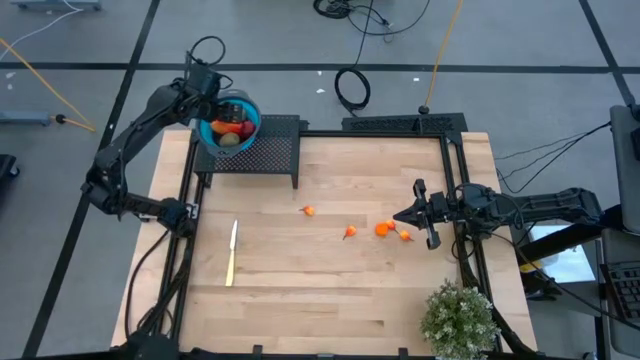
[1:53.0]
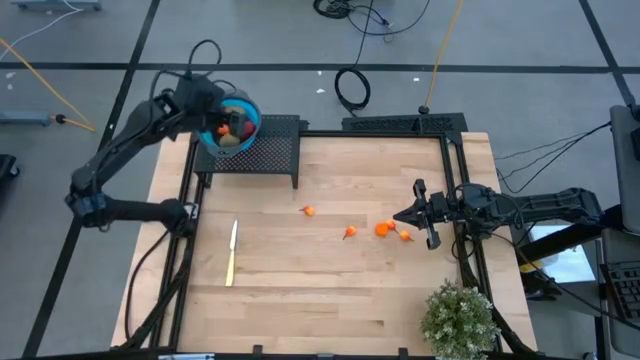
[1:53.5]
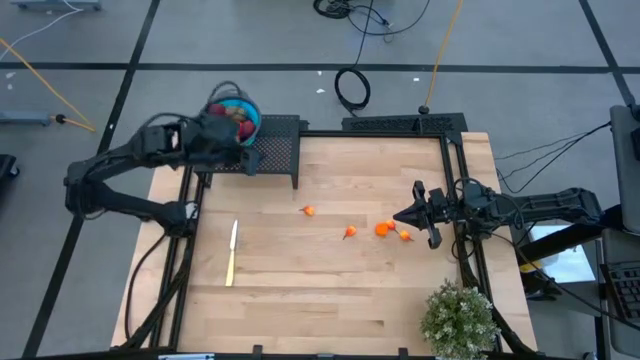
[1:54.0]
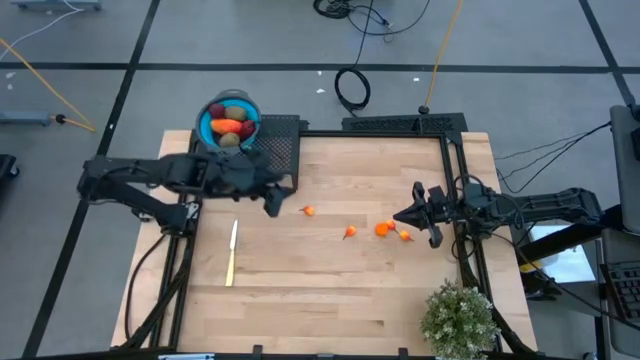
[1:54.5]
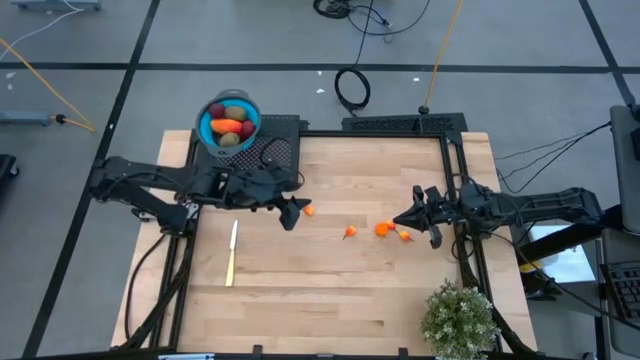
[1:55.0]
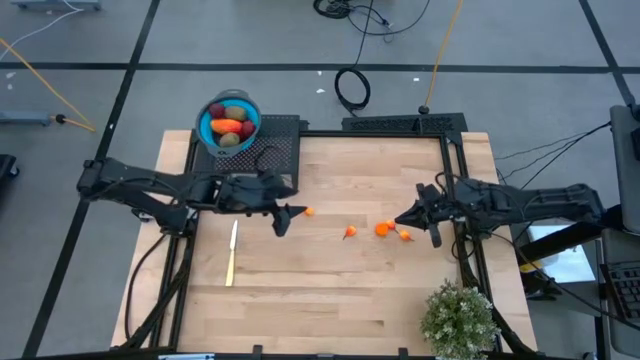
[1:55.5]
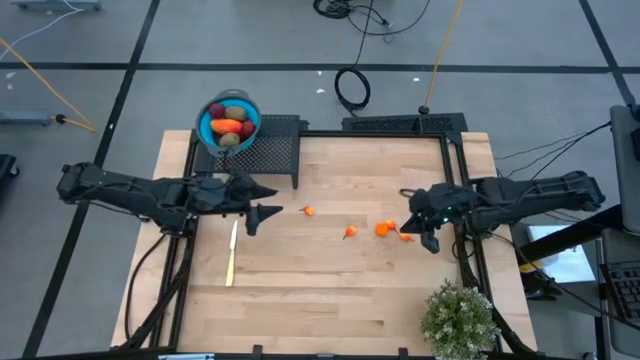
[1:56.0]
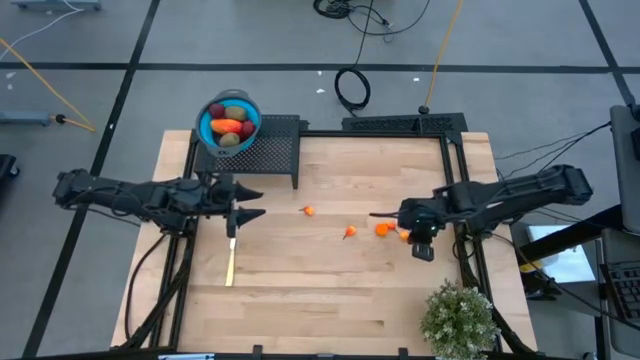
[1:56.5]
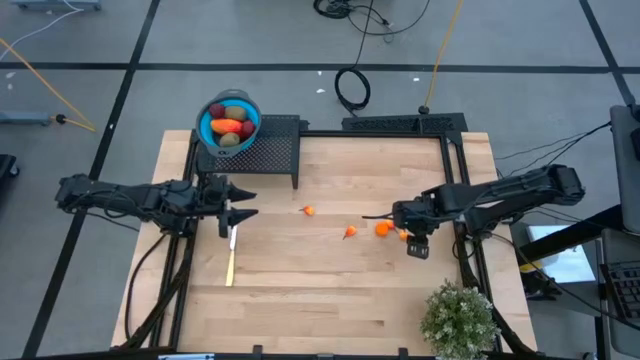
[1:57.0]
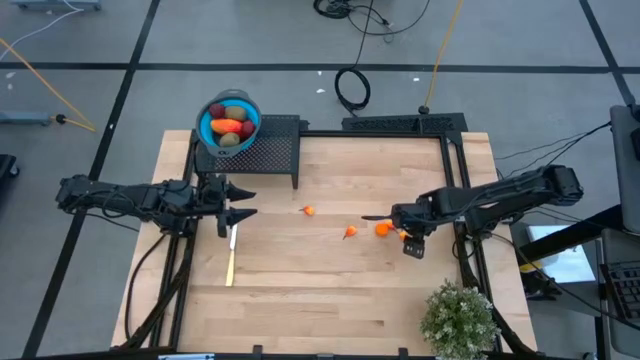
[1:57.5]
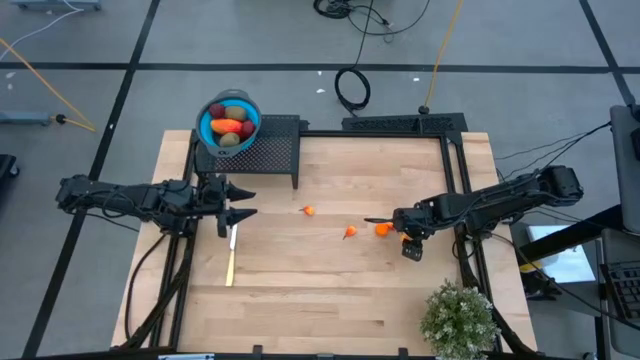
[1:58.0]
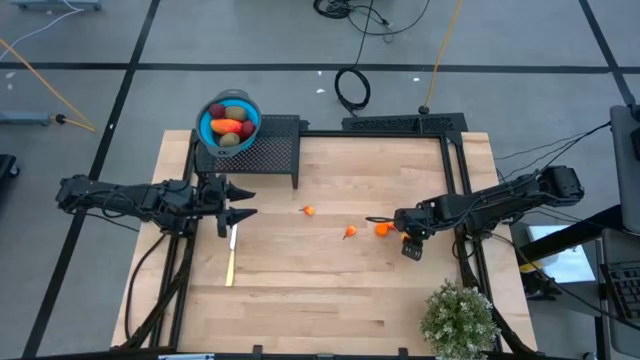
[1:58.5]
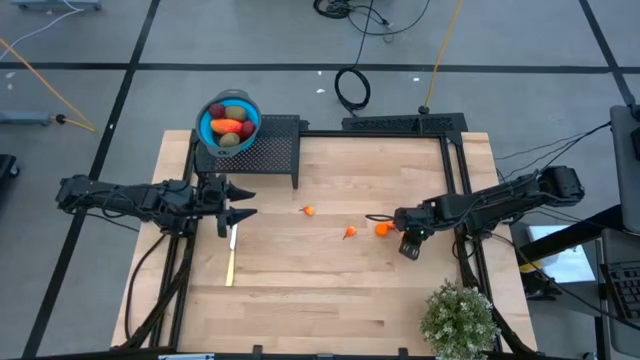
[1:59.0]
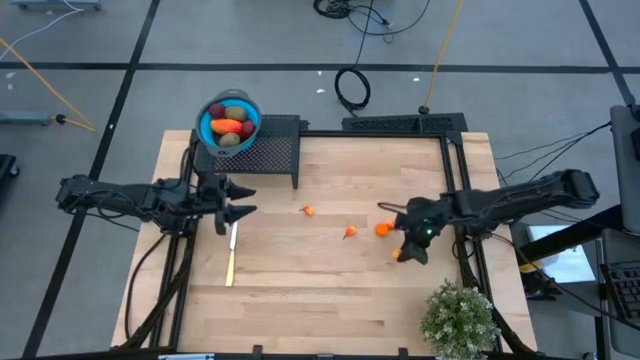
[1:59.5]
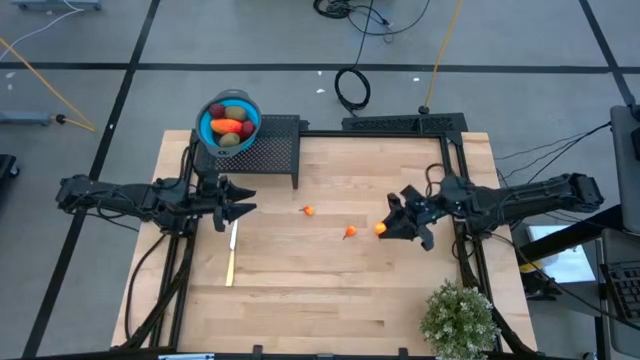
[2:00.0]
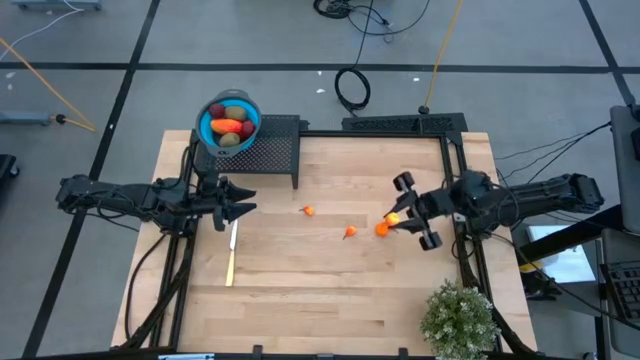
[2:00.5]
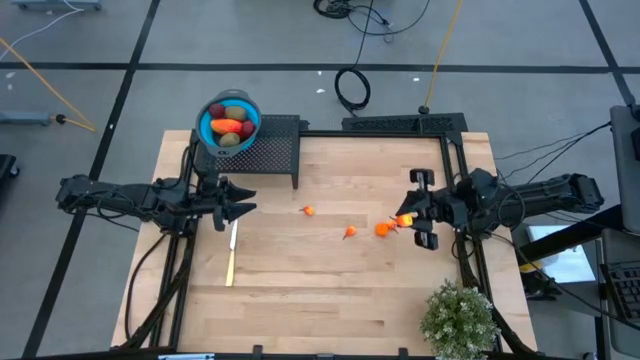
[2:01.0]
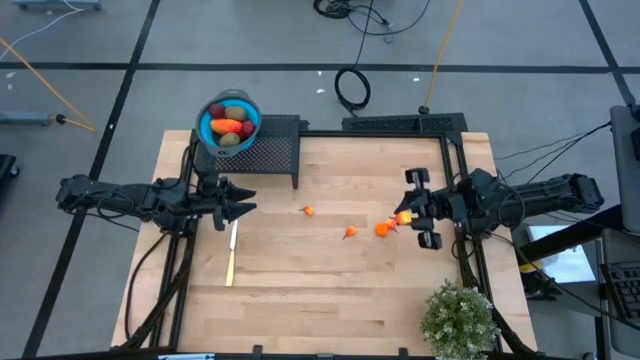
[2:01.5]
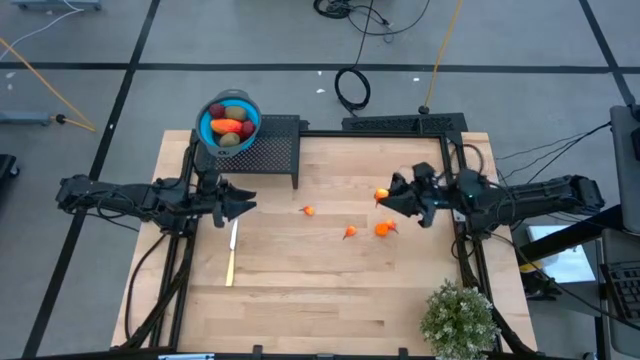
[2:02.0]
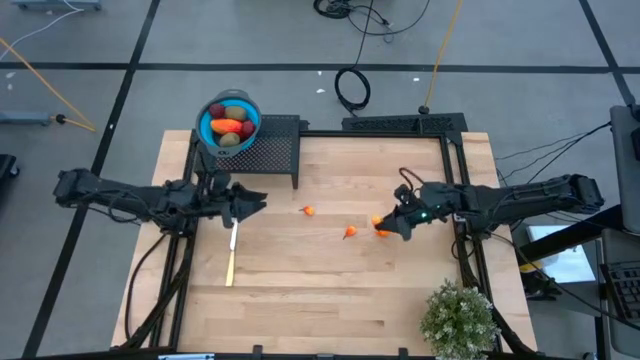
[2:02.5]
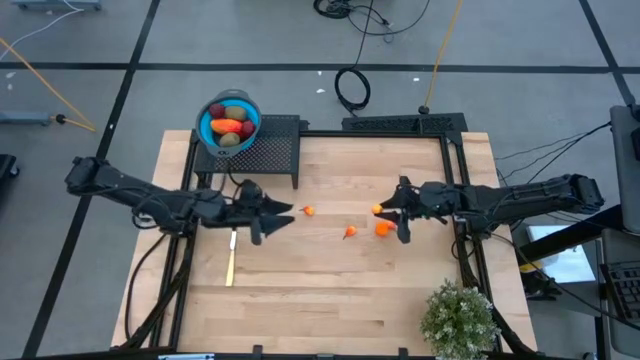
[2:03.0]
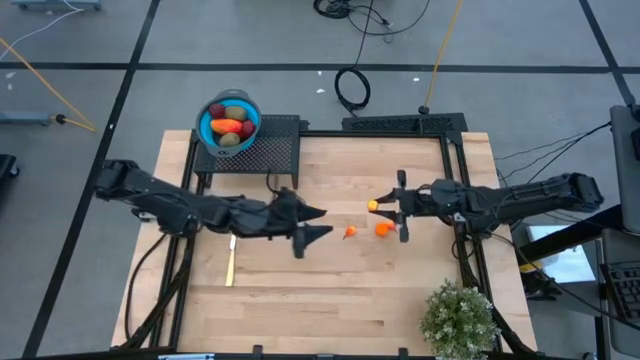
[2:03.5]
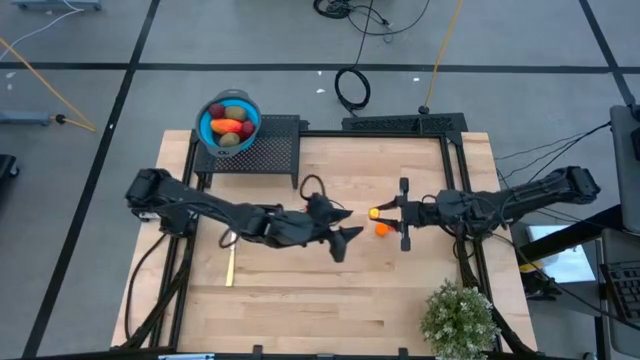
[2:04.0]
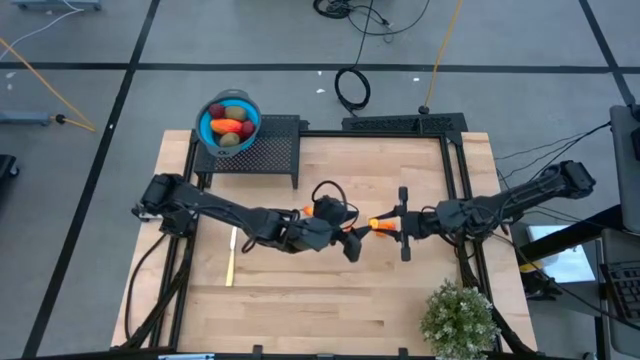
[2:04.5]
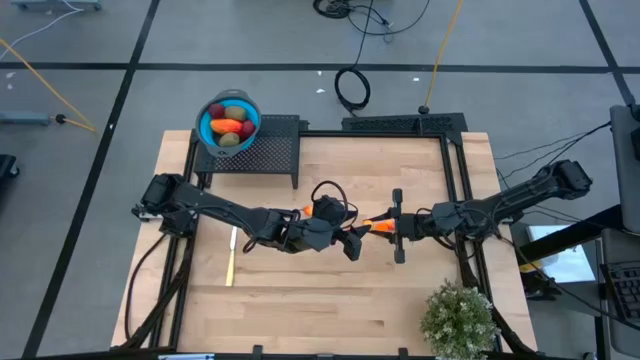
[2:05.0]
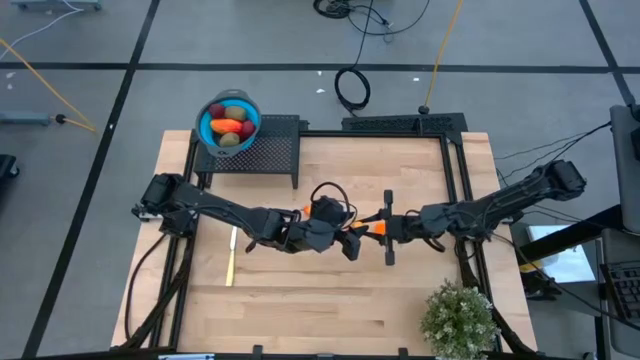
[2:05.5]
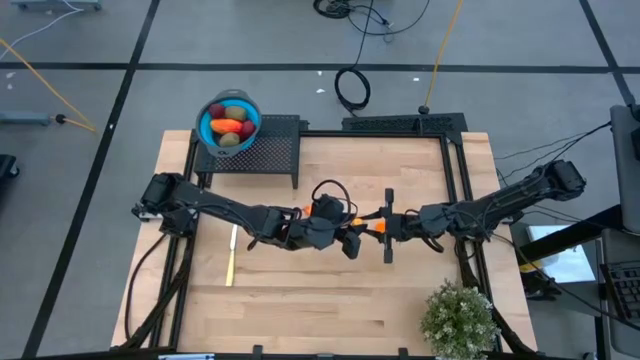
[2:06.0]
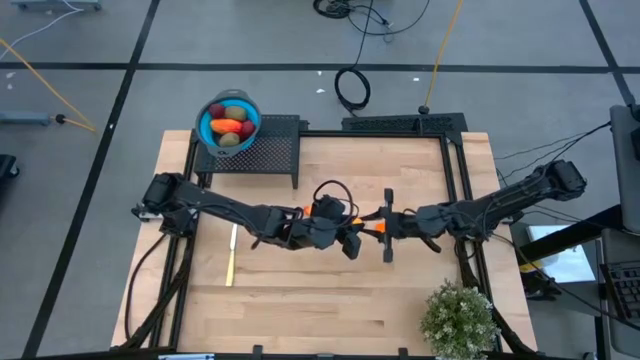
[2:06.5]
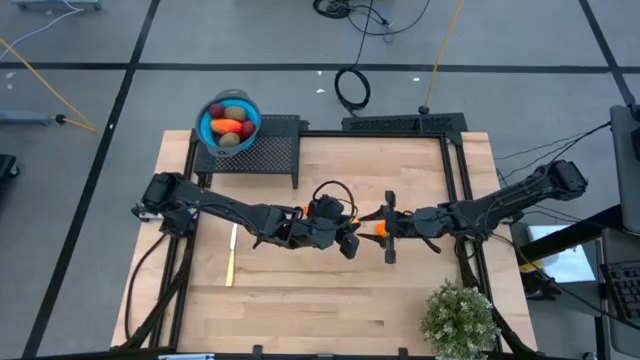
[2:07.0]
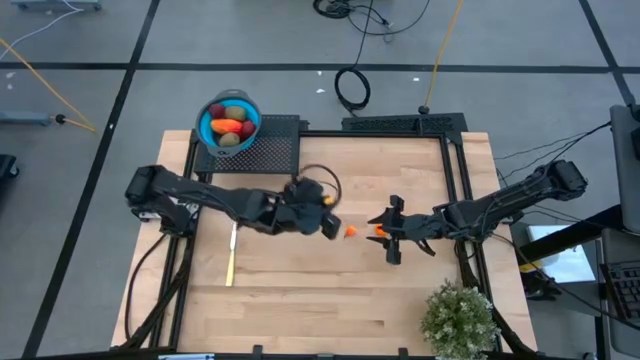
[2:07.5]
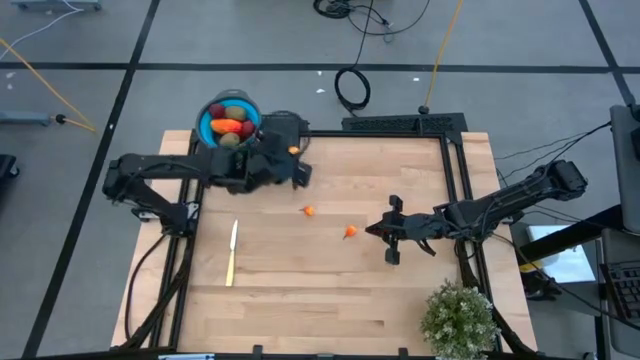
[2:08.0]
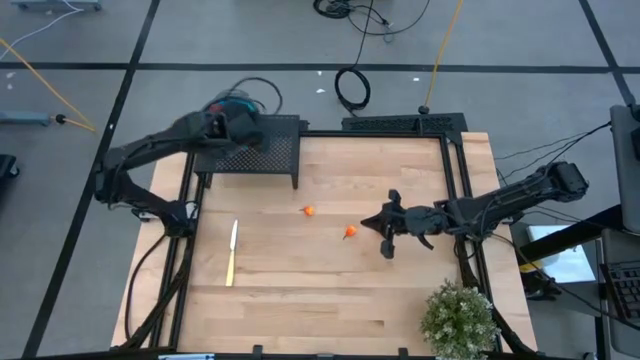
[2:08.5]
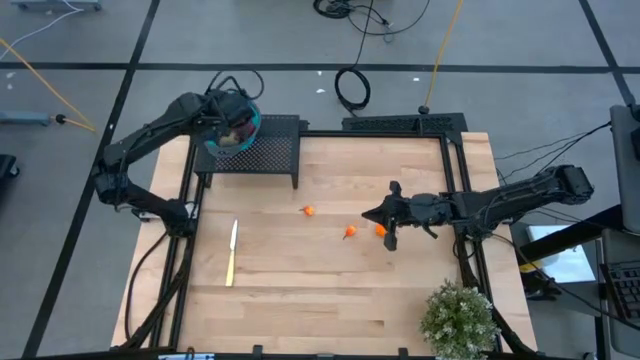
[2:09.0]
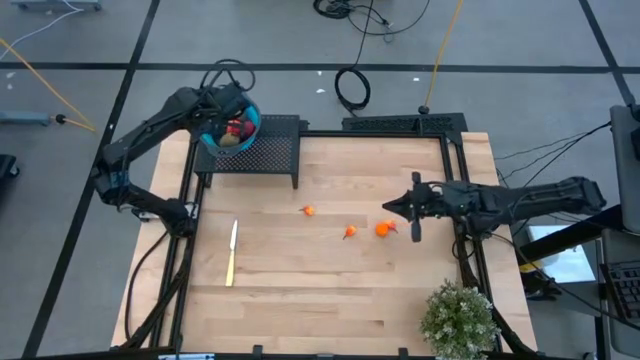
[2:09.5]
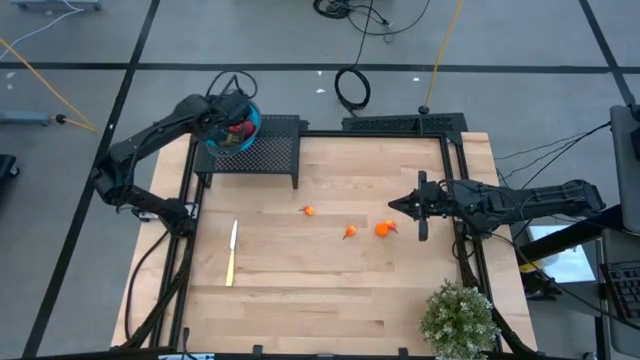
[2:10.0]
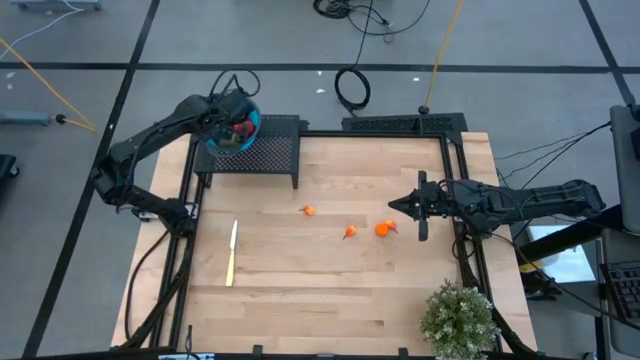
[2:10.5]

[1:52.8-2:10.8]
Task: Pick & Place Fruit
Put the pear into the blue strainer bowl on the shelf
